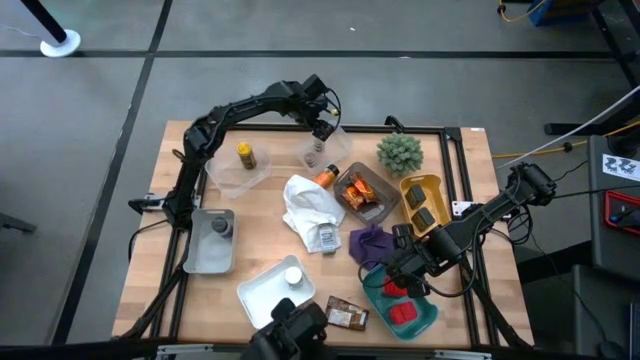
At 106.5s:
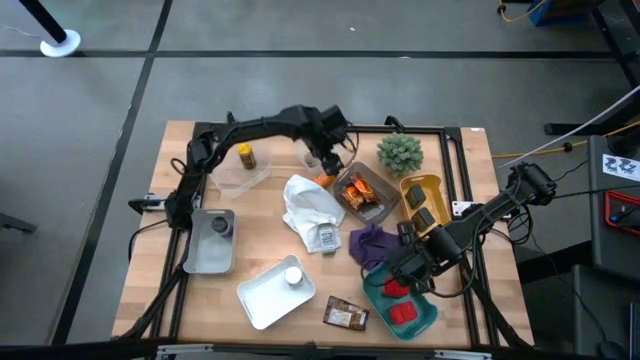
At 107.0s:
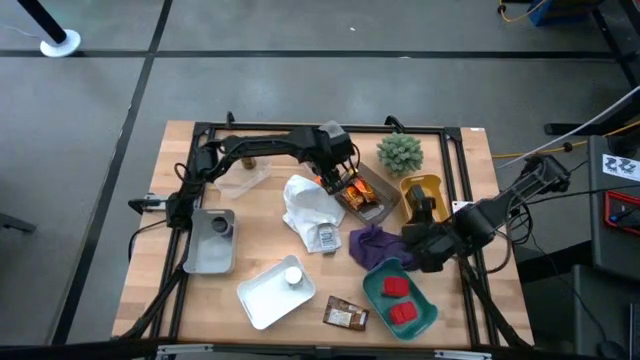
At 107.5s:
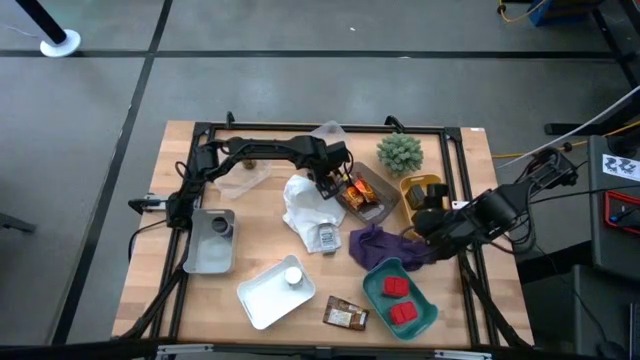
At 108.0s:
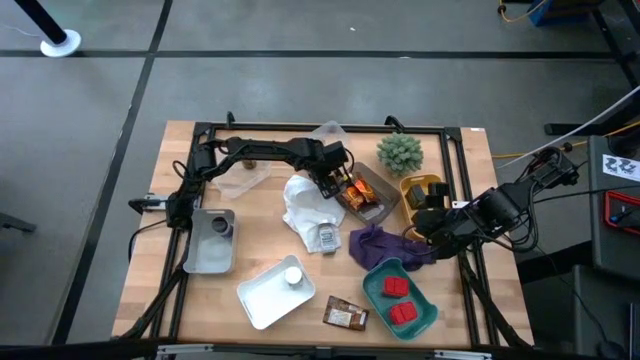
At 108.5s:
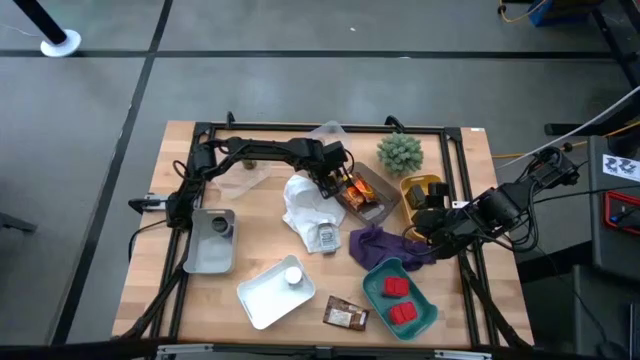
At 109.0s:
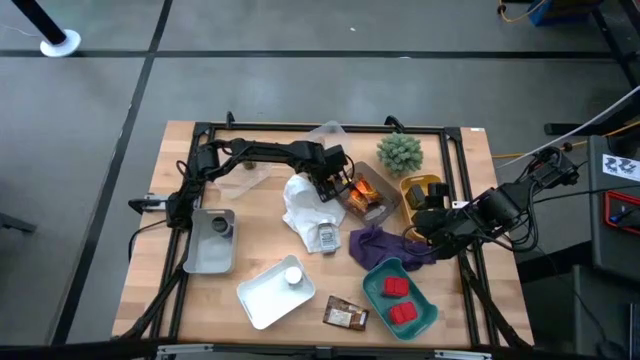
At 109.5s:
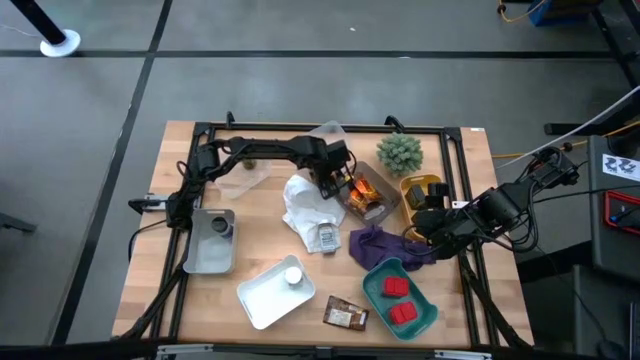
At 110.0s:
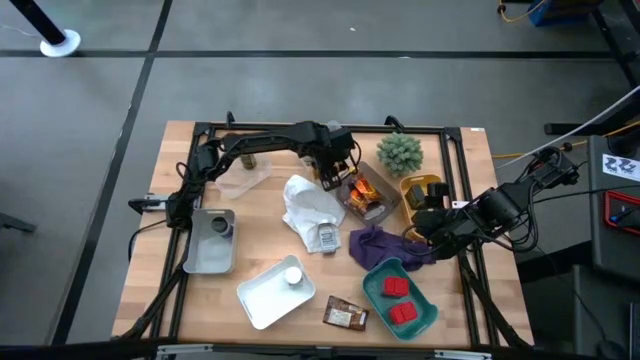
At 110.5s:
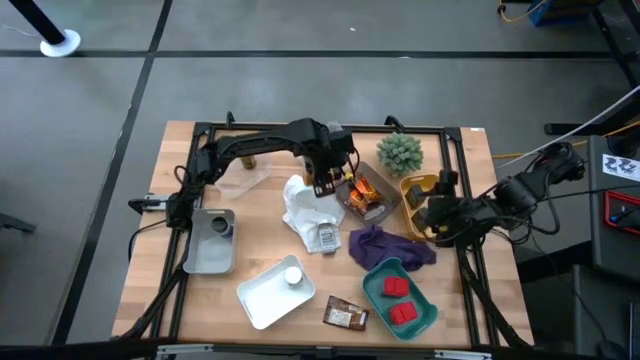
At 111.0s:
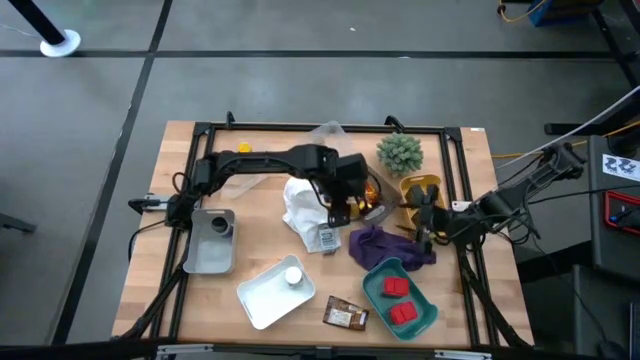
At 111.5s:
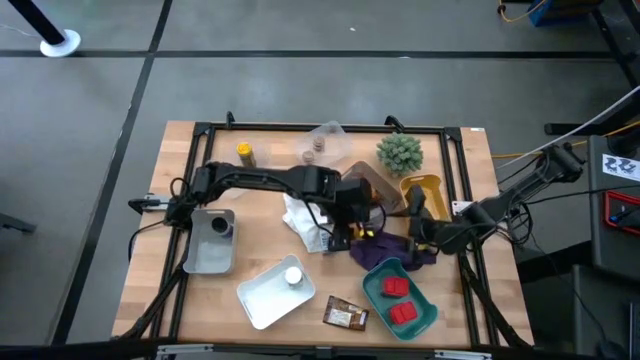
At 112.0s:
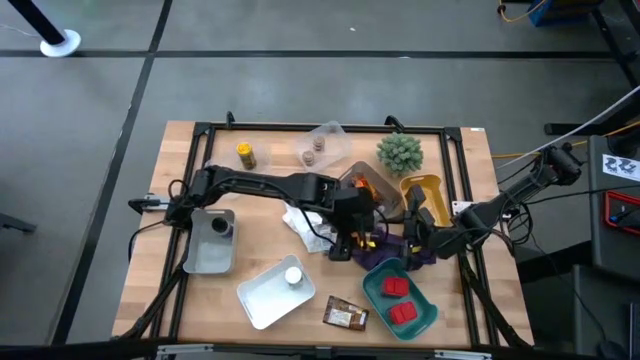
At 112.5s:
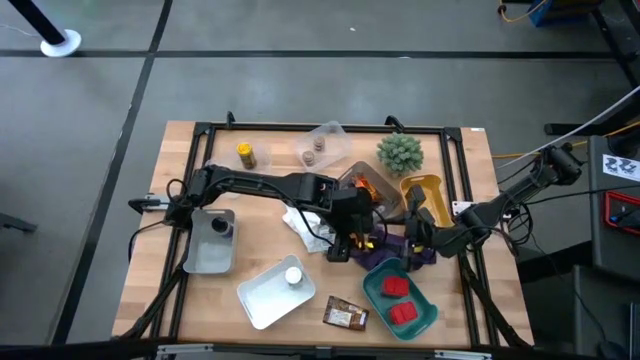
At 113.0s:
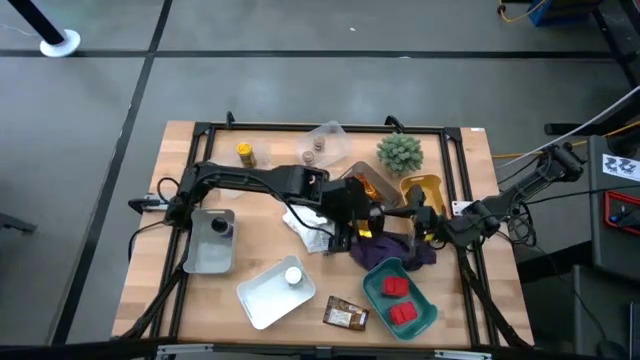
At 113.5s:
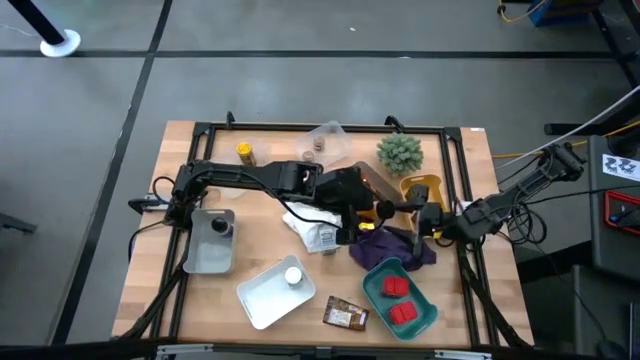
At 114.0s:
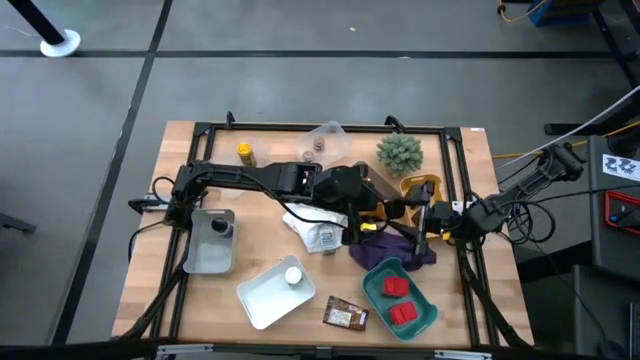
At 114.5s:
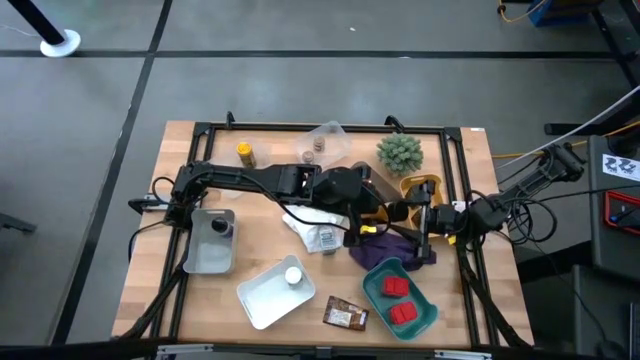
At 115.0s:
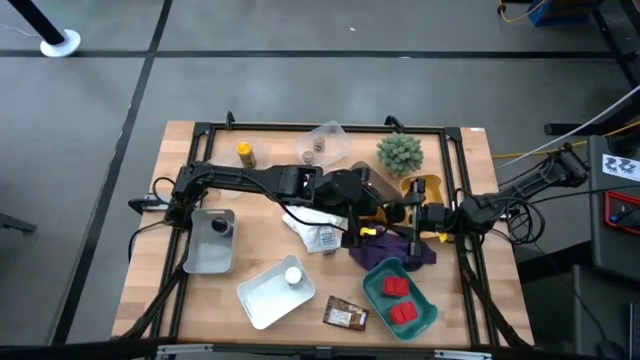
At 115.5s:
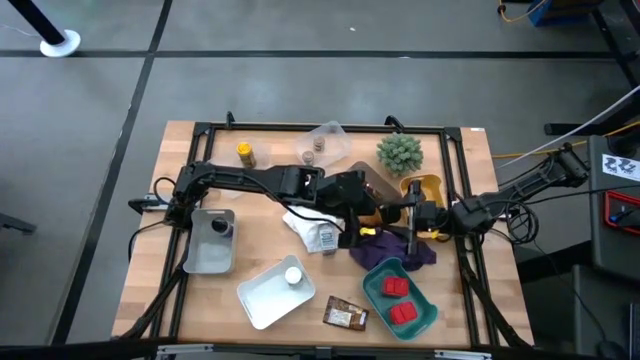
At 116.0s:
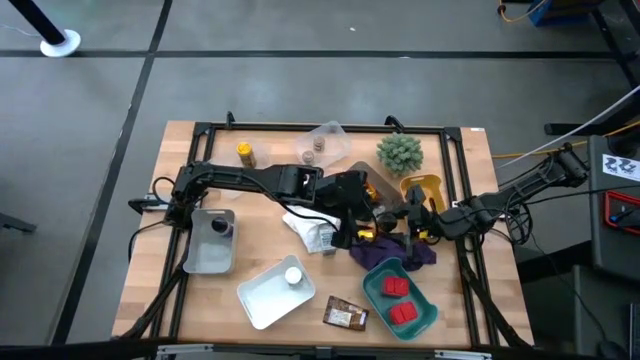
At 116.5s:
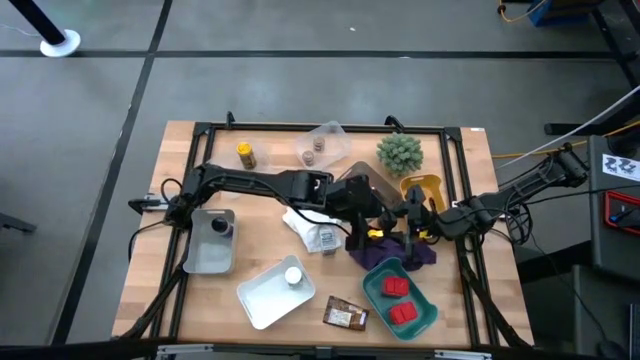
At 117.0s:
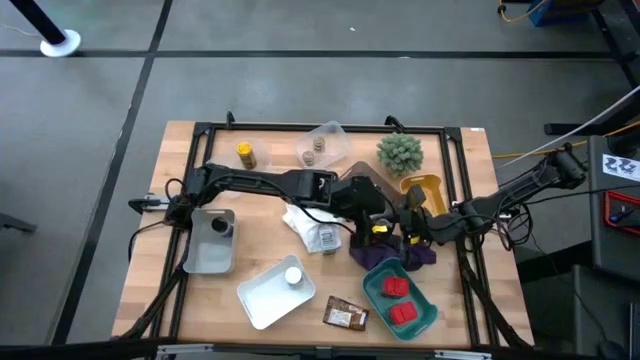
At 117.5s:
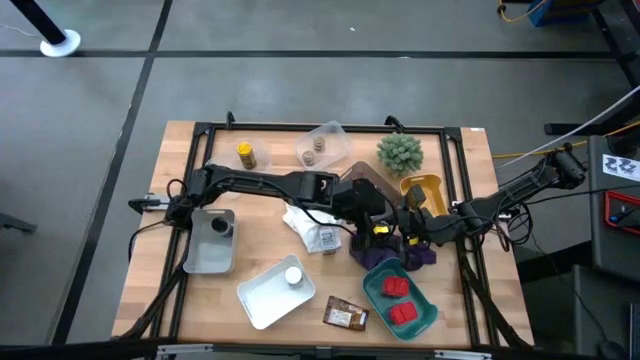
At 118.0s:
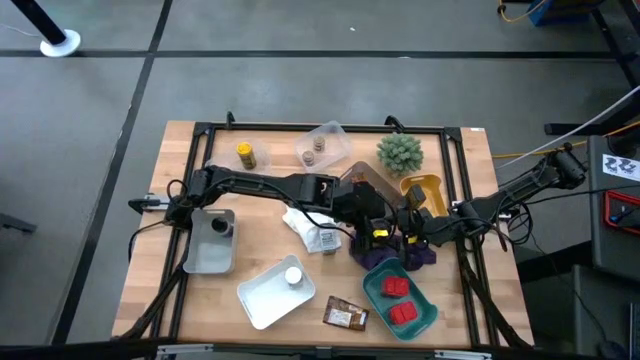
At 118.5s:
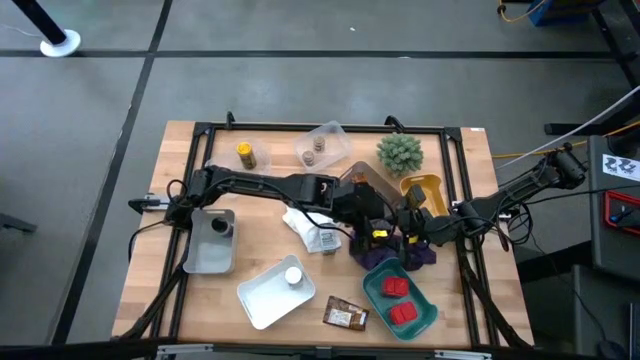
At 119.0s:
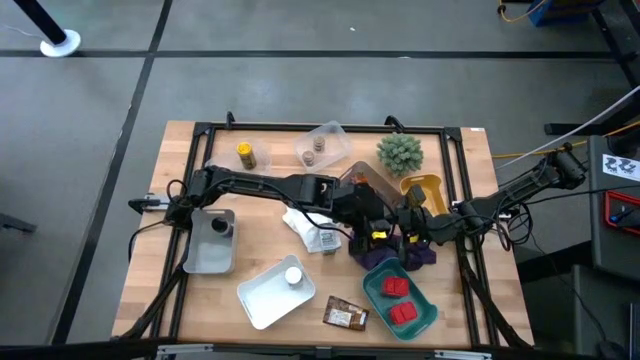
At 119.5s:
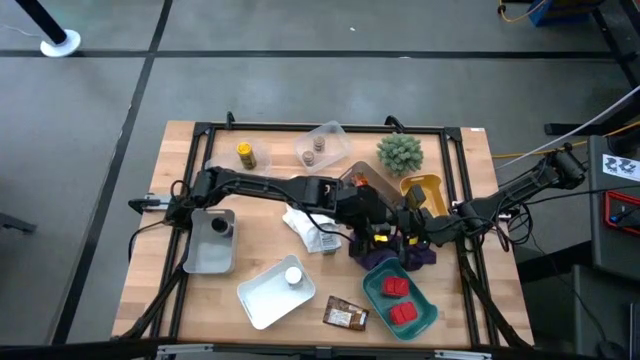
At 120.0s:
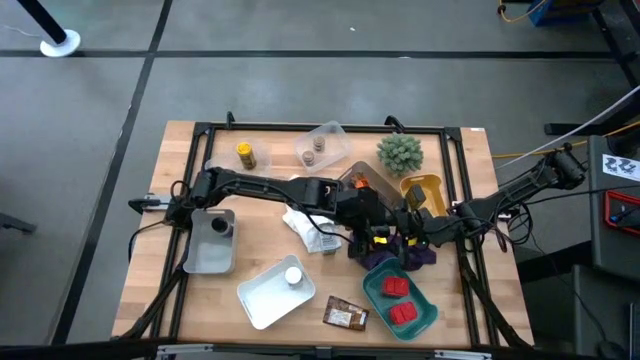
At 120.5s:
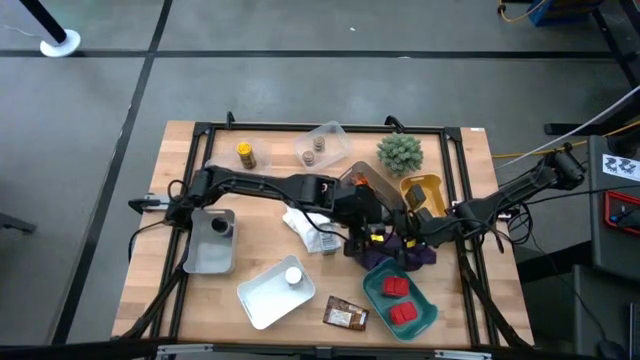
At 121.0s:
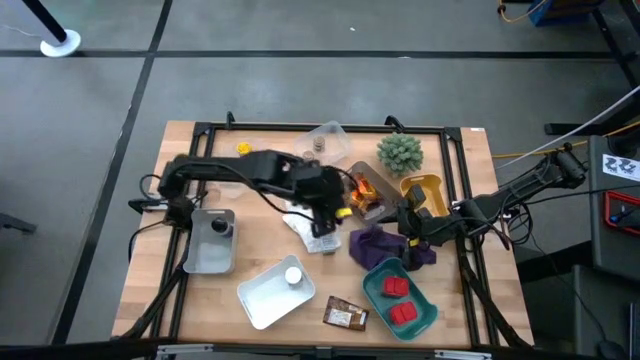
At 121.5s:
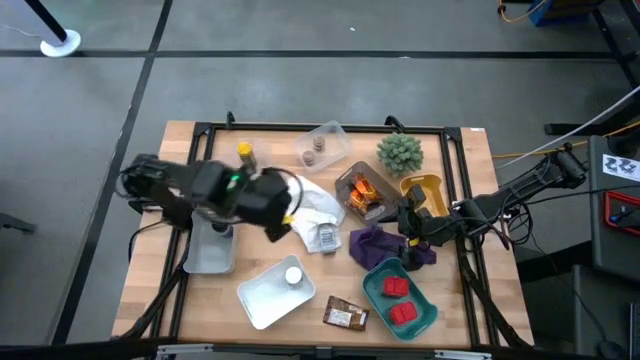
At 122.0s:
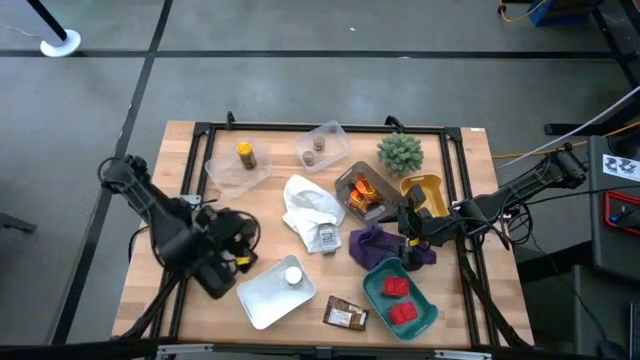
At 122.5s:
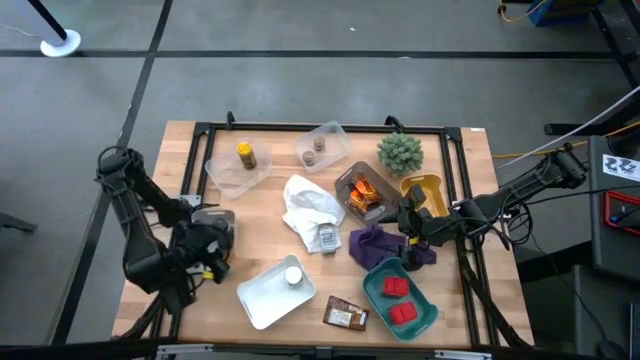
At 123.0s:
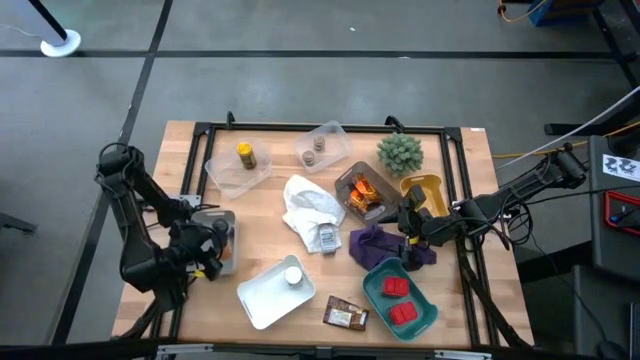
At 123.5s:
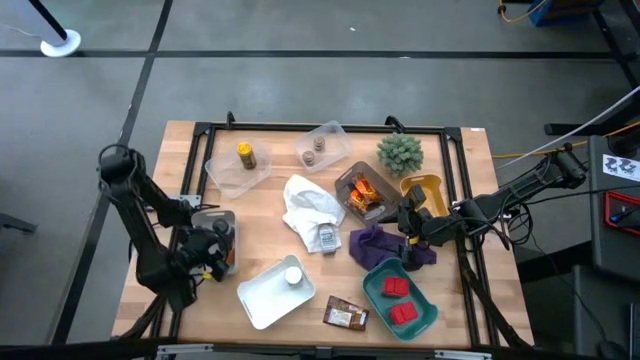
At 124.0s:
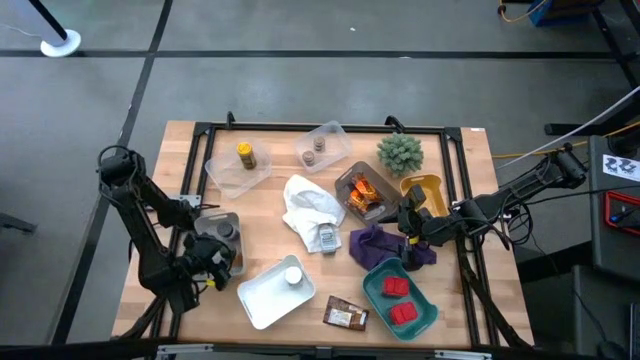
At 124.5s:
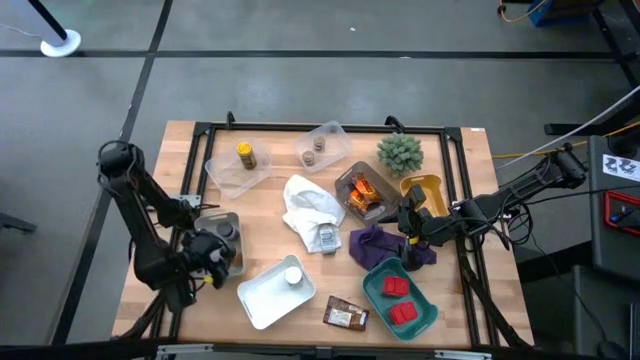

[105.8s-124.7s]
Task: Sort spices by type
Put the orange spice bottle into the gray bin
